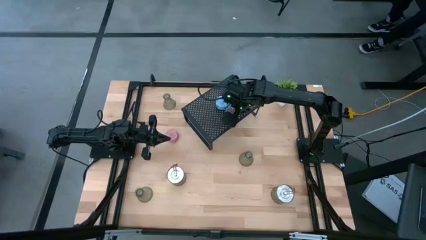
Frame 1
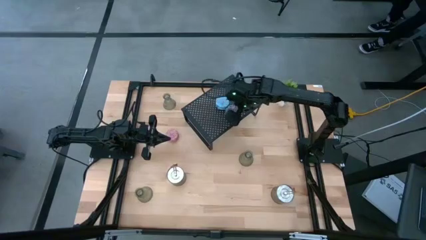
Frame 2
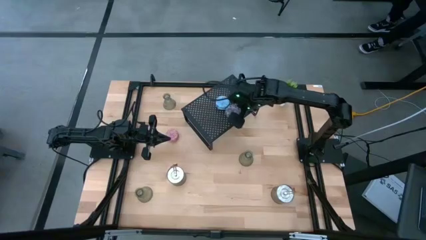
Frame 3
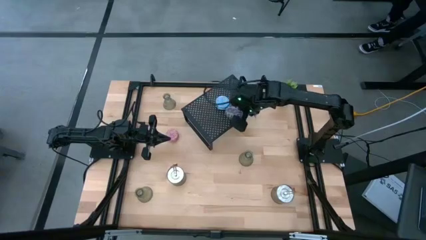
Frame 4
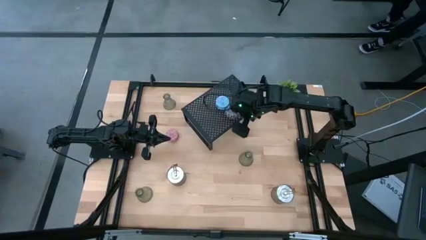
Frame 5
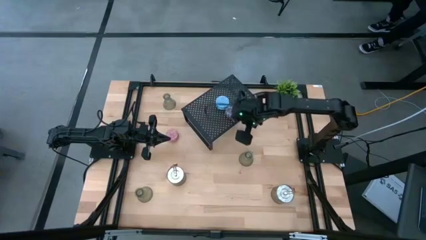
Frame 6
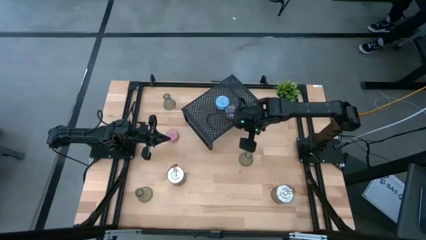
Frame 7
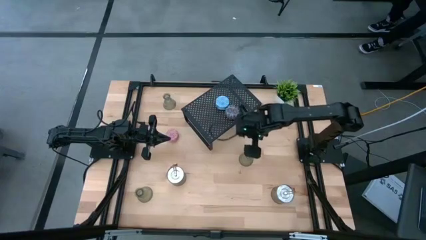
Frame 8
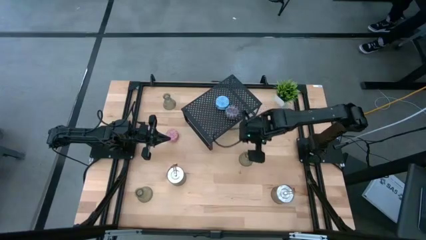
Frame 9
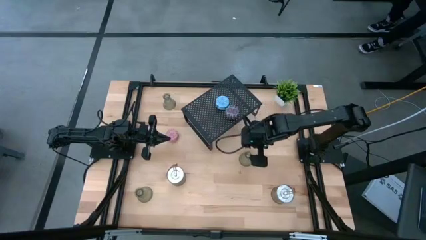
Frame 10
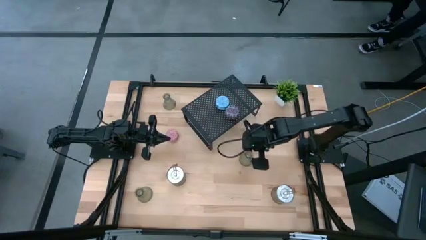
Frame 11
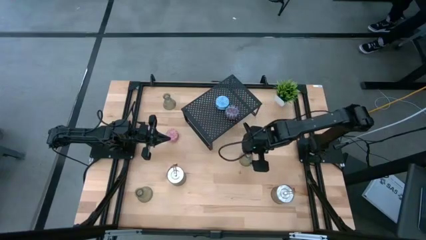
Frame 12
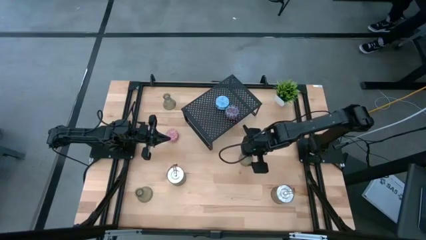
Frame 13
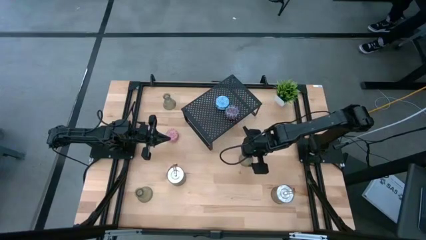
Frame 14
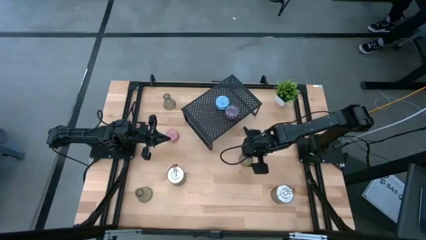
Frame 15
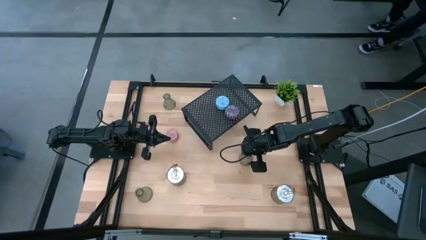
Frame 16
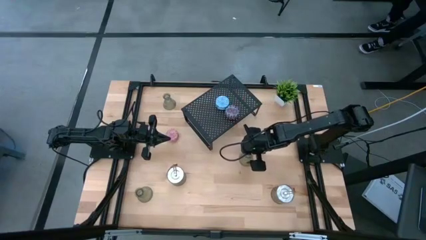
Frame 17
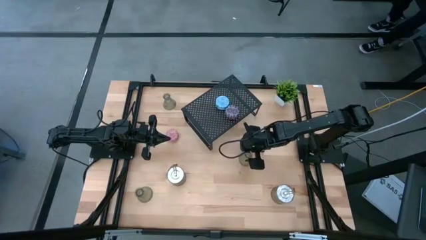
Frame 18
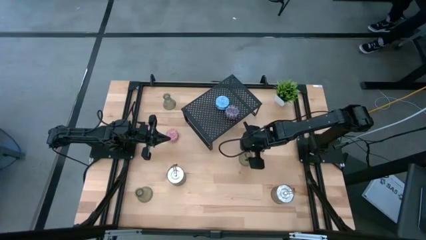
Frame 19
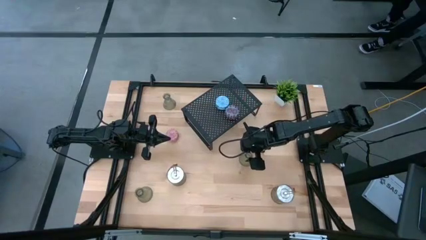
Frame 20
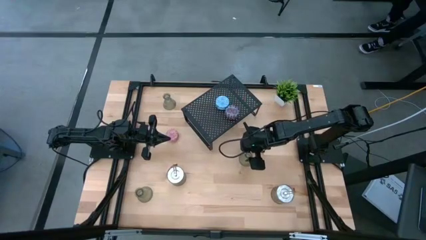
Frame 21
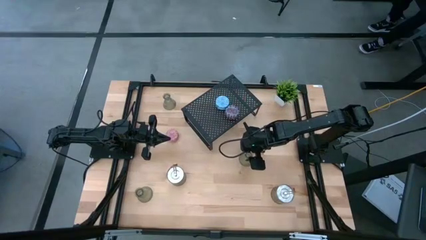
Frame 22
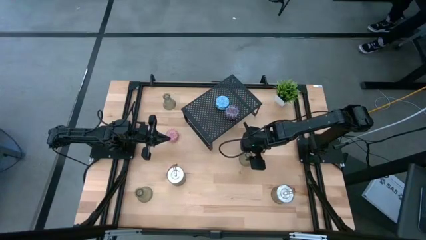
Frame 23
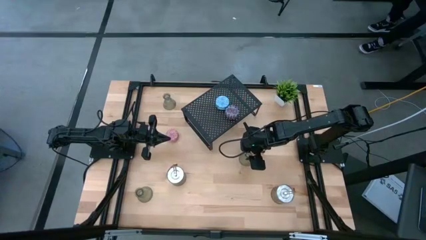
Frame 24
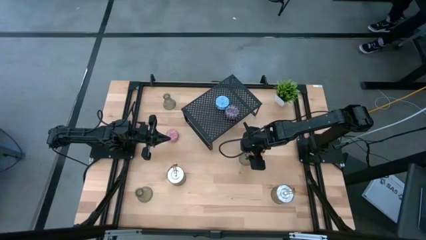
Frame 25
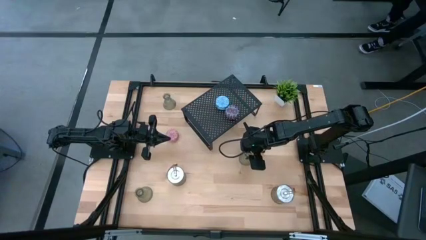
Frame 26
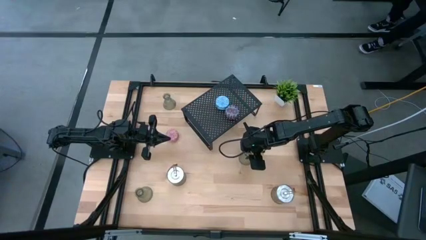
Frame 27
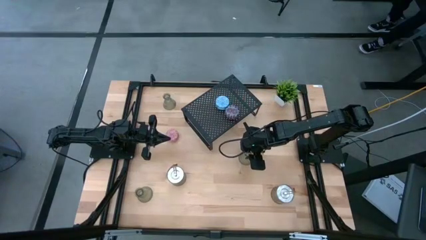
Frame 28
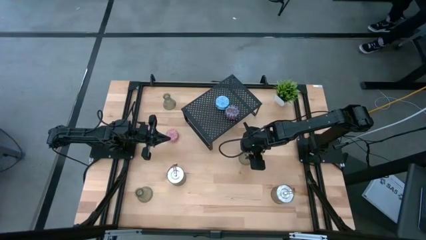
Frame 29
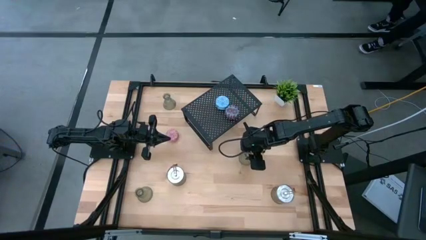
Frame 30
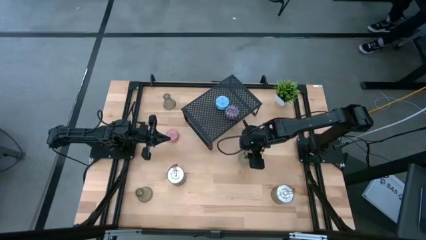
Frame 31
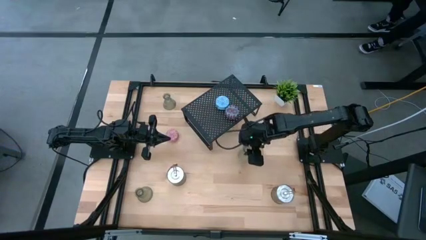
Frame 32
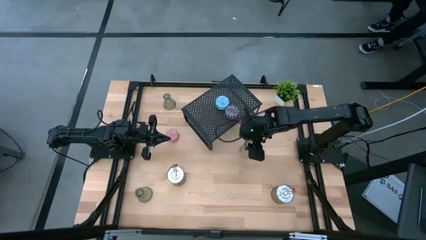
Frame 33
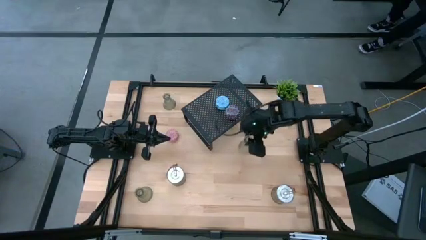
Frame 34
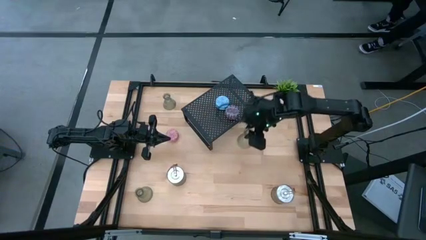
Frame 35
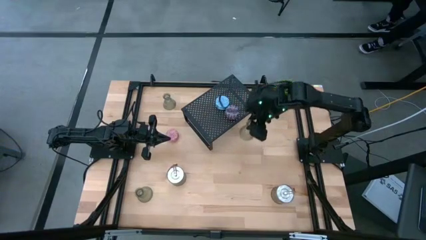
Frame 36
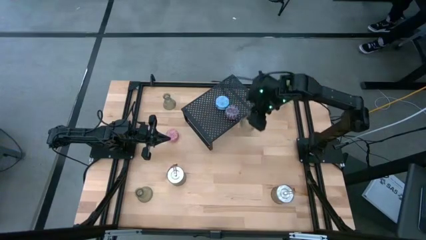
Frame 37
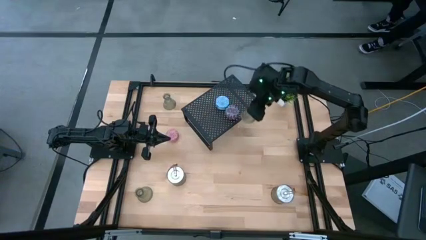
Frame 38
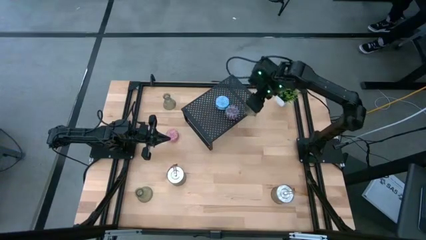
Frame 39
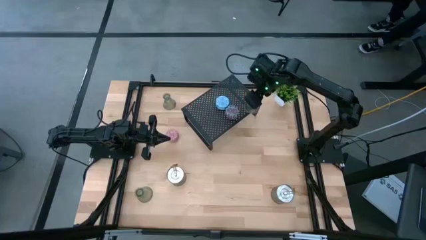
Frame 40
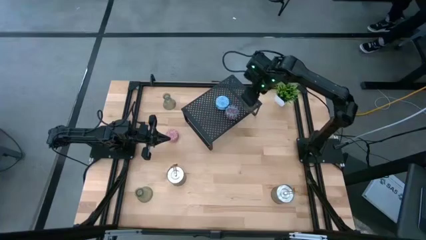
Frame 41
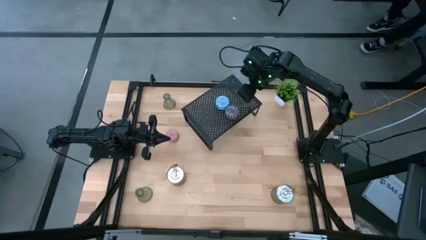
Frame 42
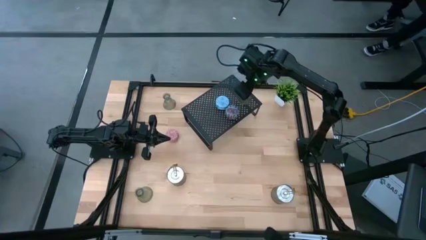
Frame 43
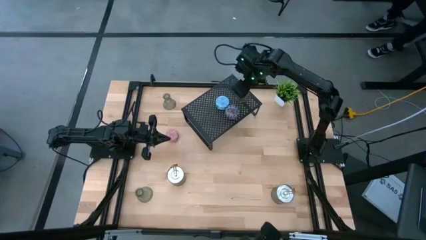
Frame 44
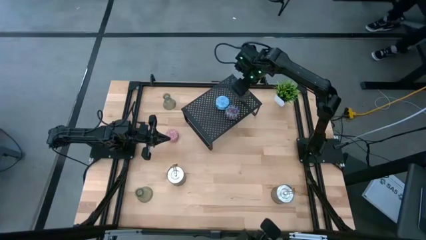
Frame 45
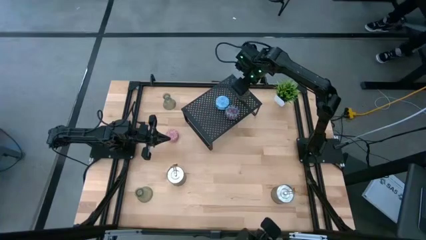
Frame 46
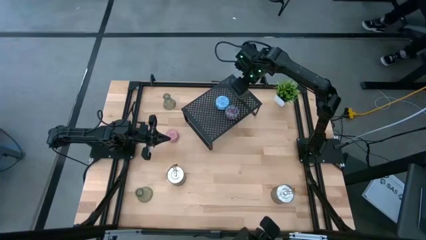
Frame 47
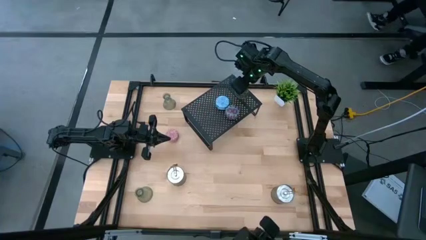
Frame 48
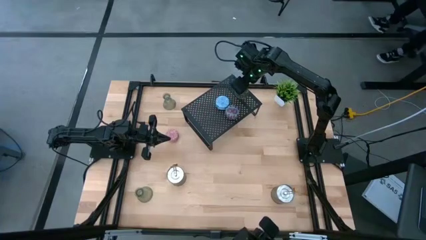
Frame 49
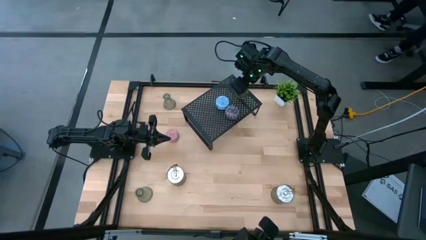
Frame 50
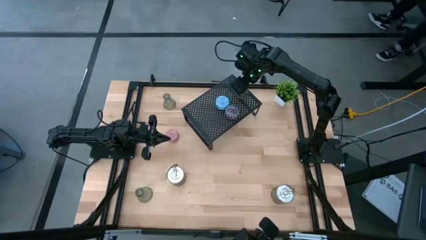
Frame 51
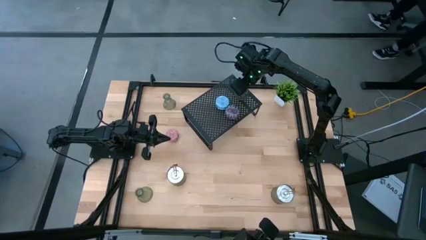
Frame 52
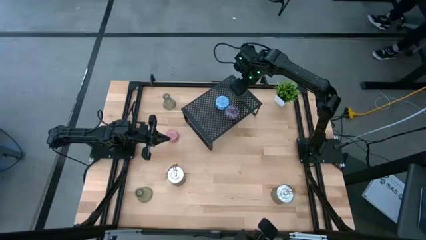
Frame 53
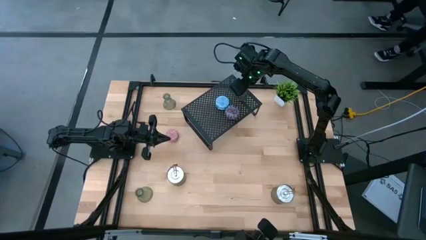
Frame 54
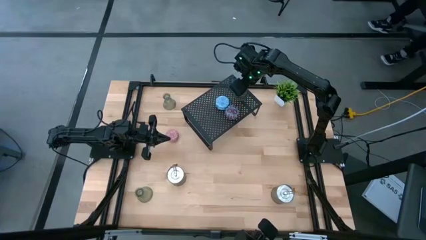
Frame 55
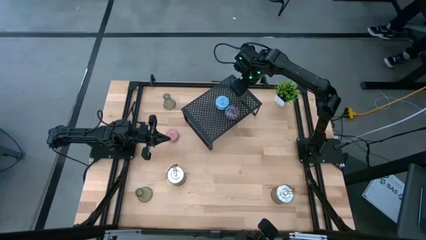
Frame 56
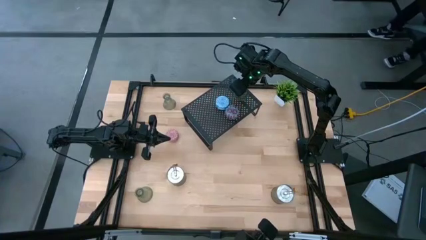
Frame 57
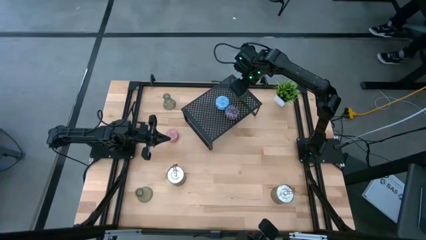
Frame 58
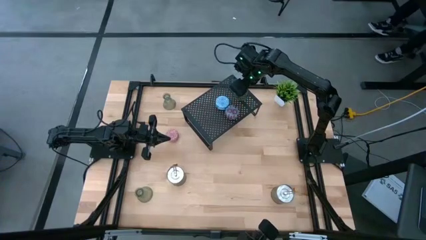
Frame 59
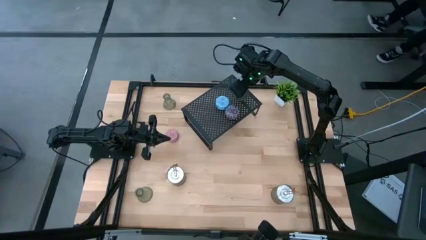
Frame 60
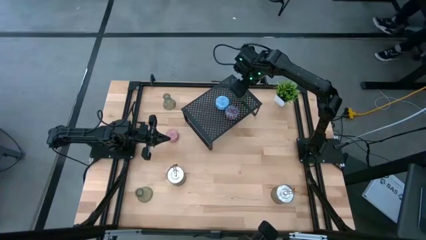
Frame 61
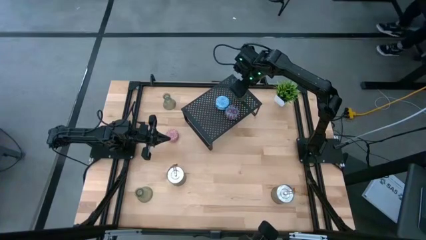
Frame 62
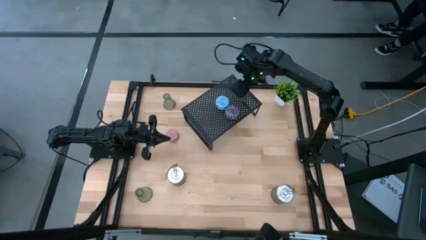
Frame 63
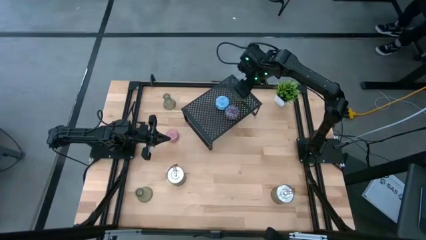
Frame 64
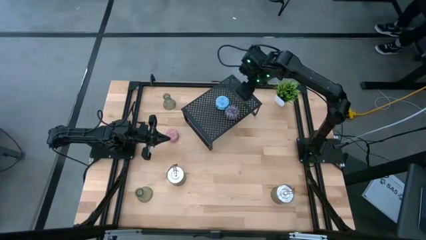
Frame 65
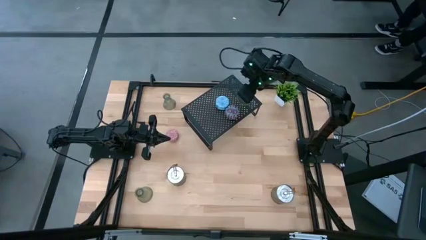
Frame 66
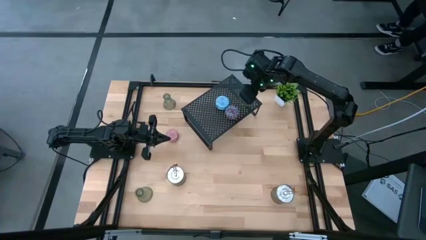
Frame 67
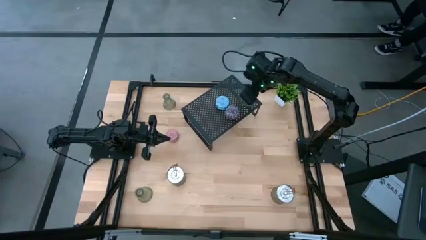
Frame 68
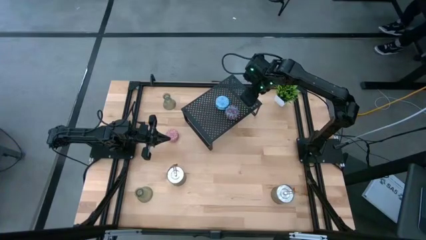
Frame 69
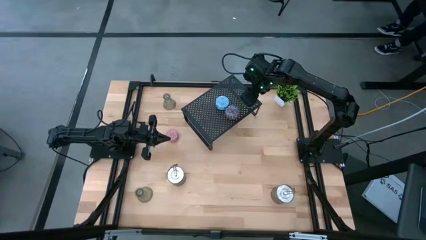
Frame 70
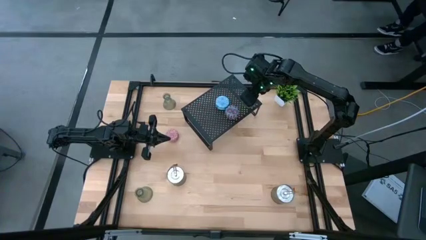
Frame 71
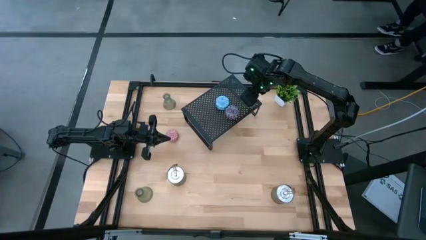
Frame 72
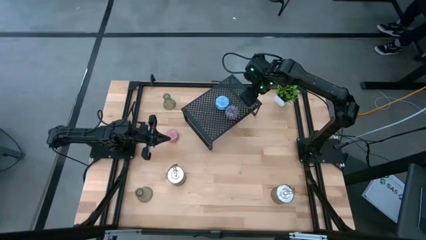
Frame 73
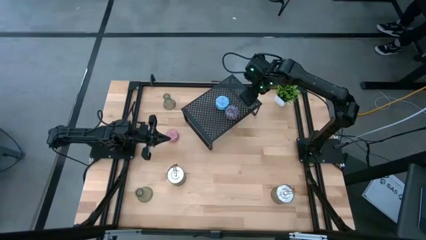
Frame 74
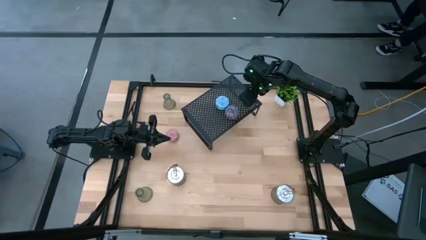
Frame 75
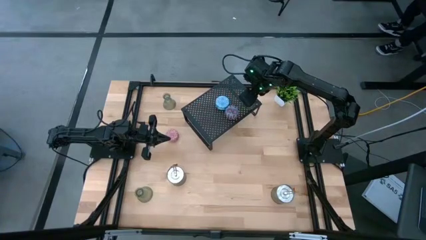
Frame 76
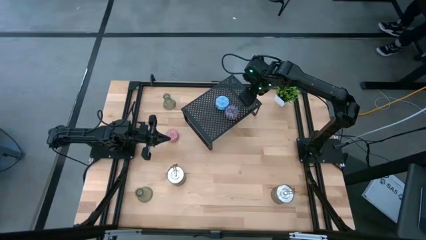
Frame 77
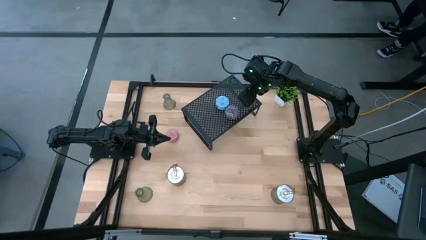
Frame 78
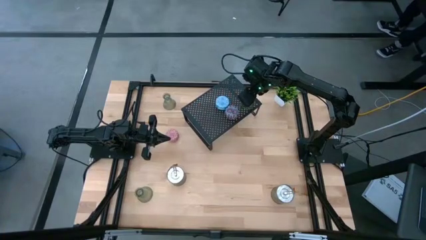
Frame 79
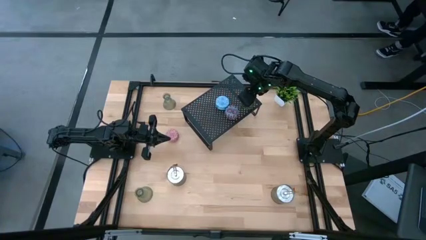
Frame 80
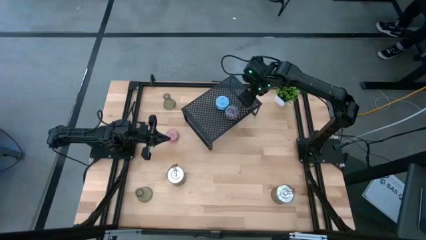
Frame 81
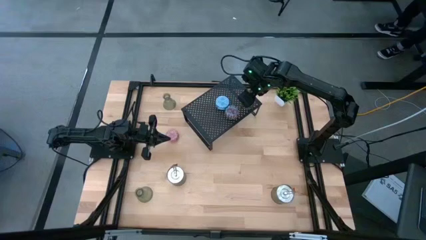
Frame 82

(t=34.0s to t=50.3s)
Task: Pick & Place candle stick holders
Put the middle green glass candle holder on the shelf
